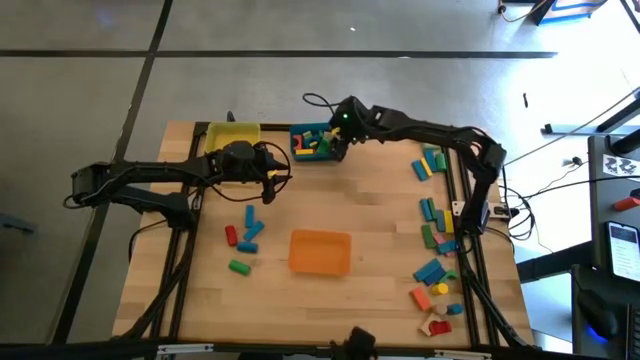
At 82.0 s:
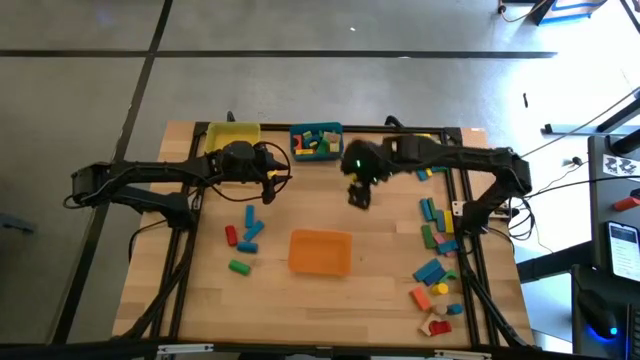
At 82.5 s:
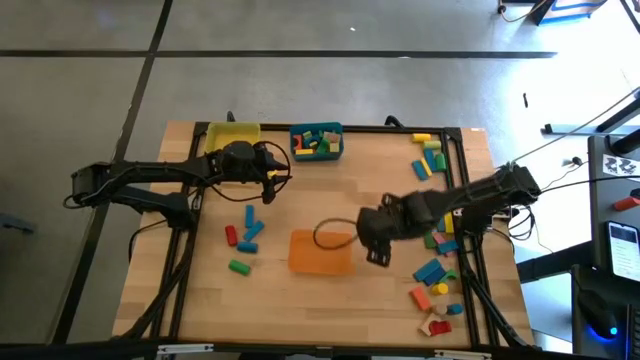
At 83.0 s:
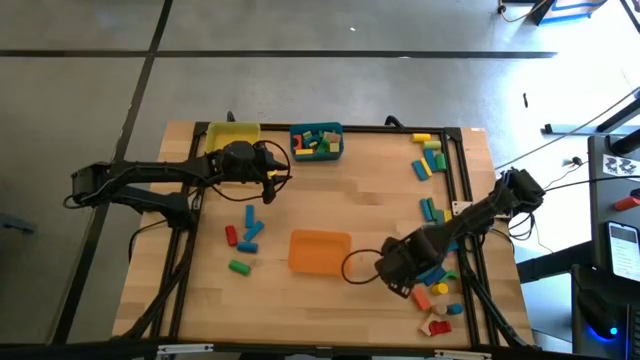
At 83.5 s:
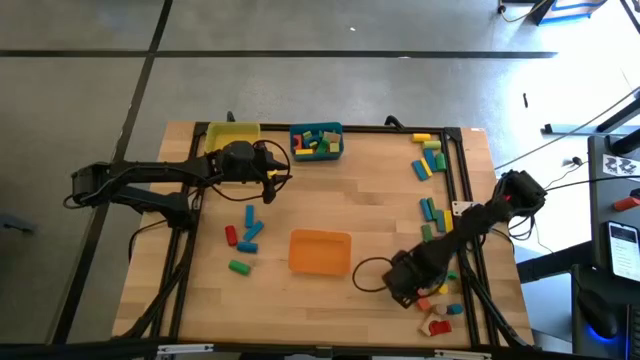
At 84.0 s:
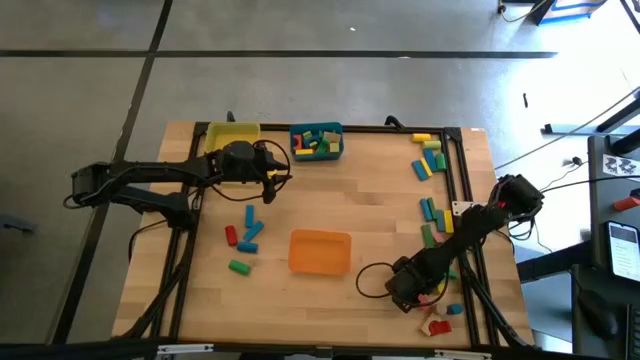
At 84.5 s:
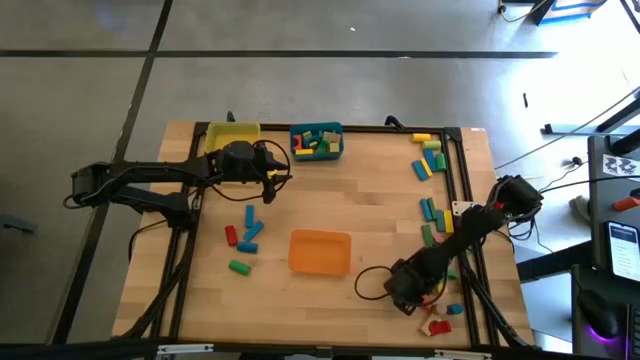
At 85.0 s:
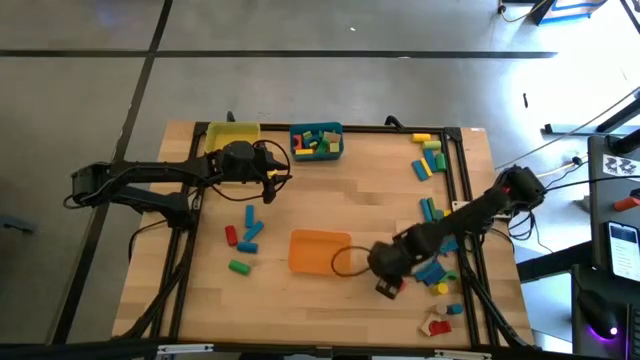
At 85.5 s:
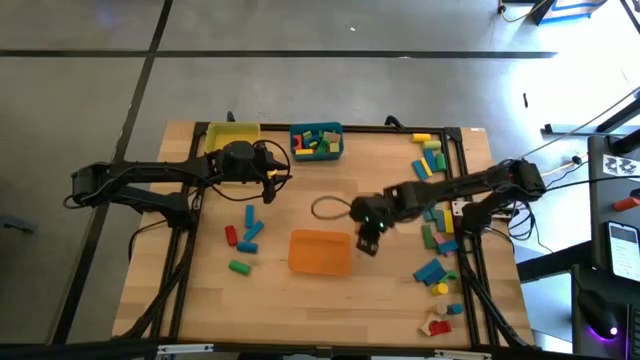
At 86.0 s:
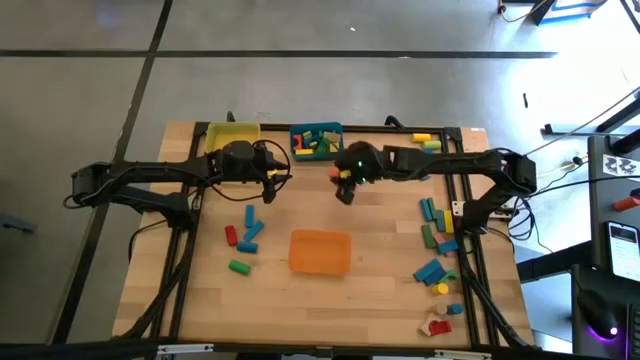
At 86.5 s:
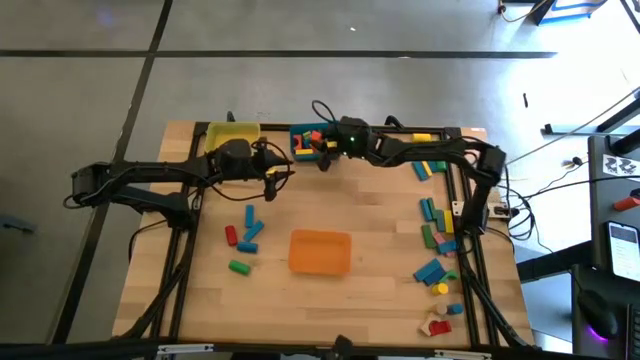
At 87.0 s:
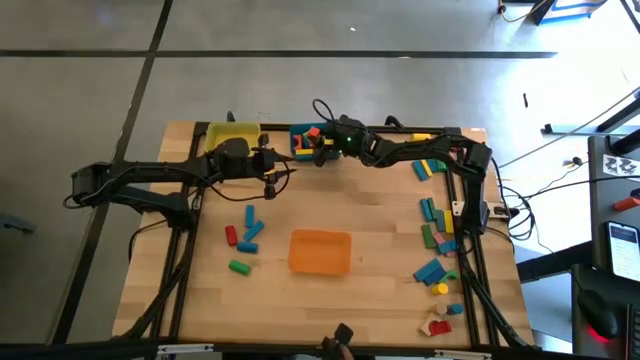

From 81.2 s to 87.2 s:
Task: Sort blocks by size
Put the orange arch block into the blue bin

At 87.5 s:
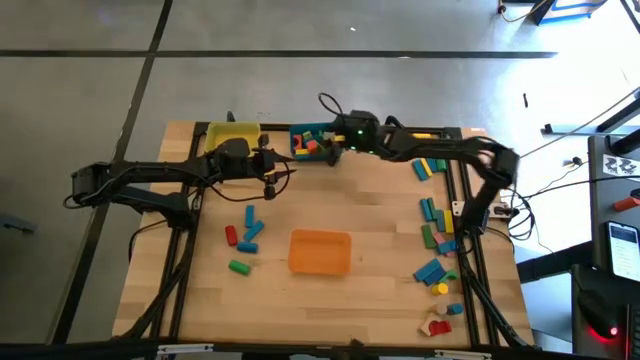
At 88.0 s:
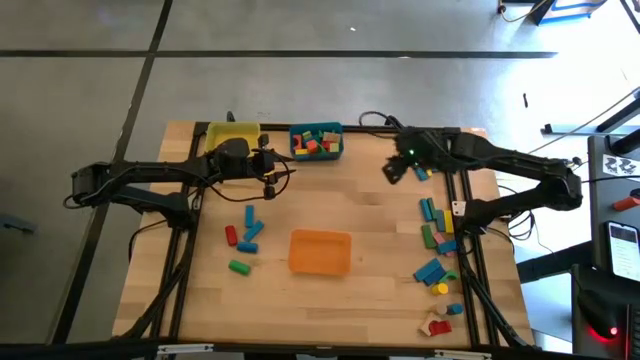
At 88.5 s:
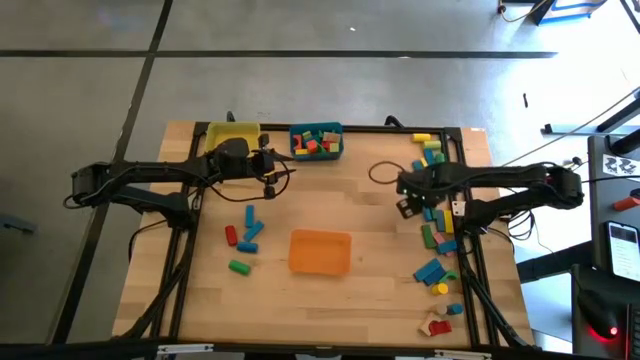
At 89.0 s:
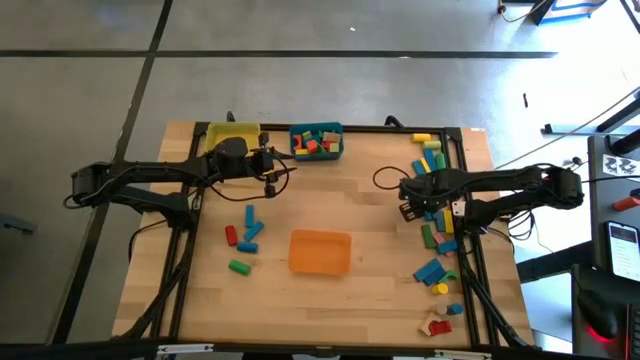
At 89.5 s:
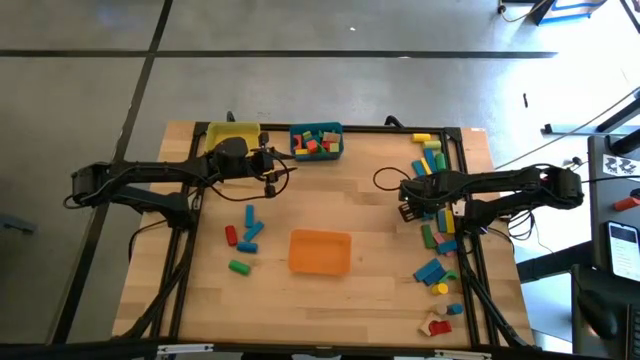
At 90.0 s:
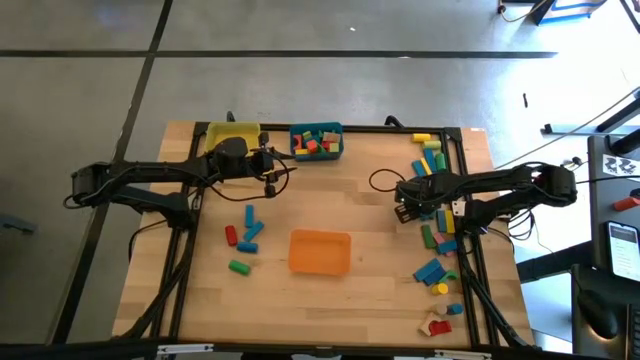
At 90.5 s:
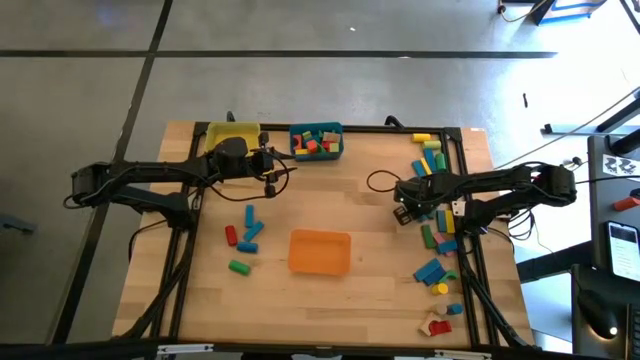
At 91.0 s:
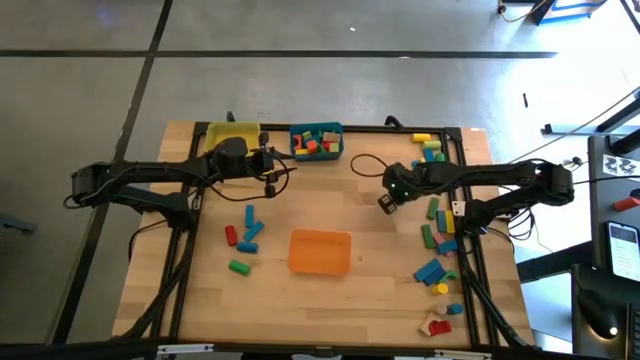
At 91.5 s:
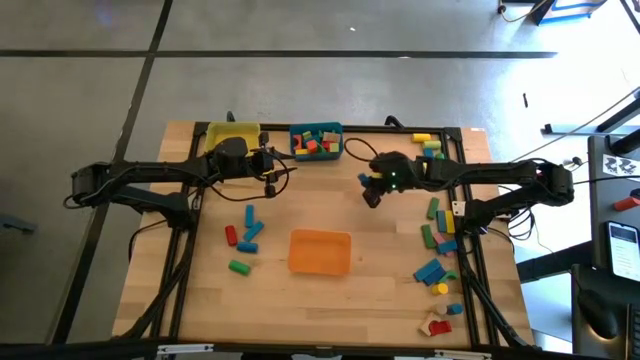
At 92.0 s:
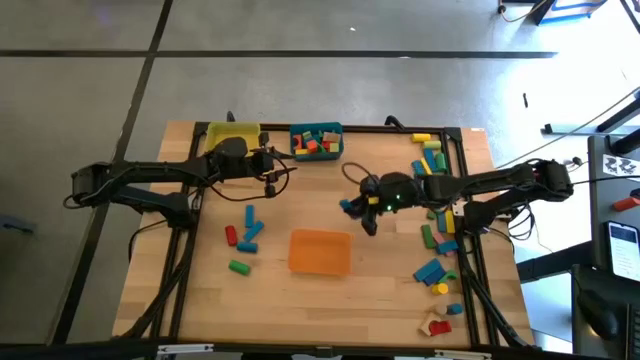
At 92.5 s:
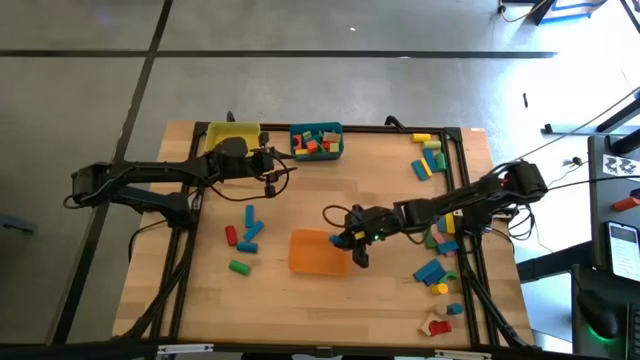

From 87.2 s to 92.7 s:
Put the blue rectangular block into the orange bin

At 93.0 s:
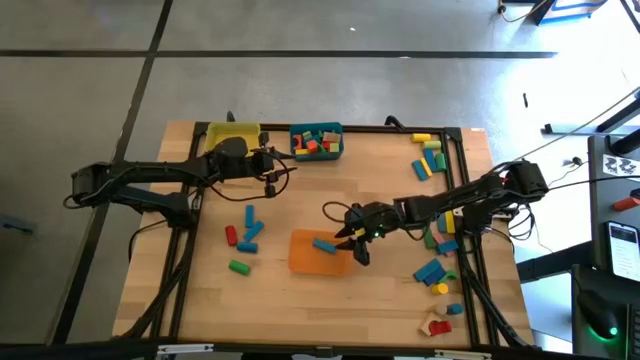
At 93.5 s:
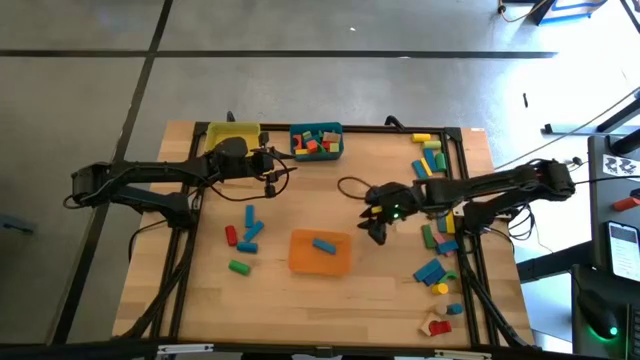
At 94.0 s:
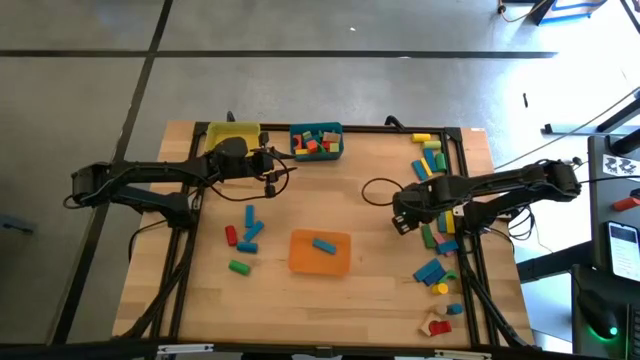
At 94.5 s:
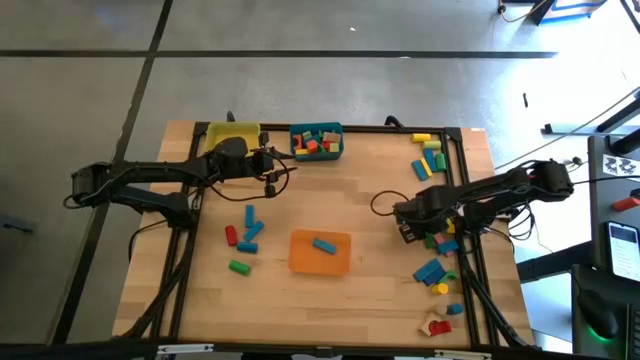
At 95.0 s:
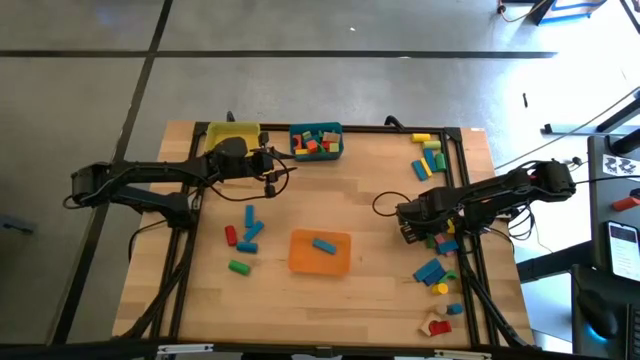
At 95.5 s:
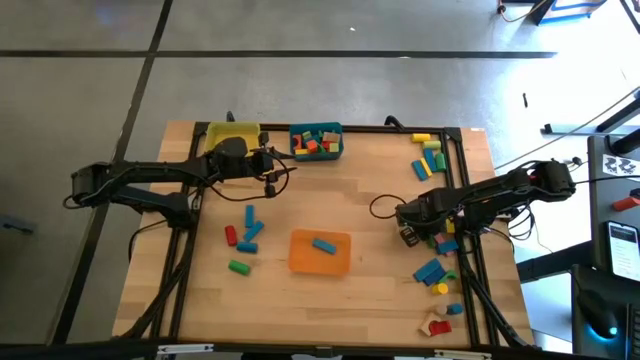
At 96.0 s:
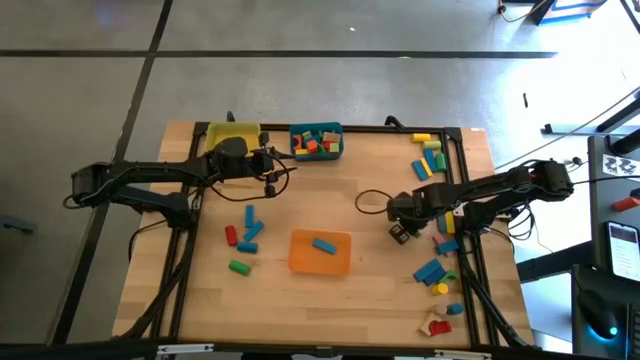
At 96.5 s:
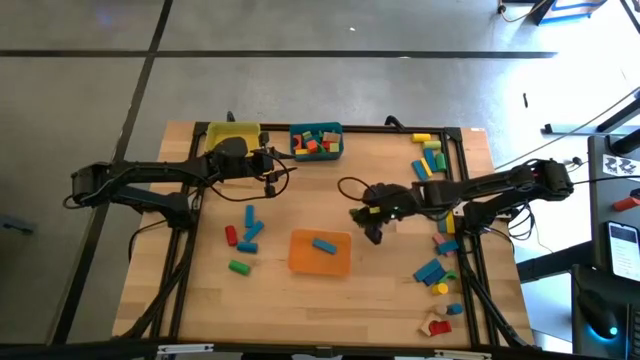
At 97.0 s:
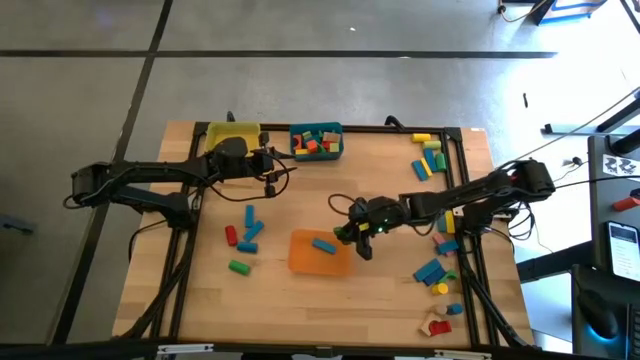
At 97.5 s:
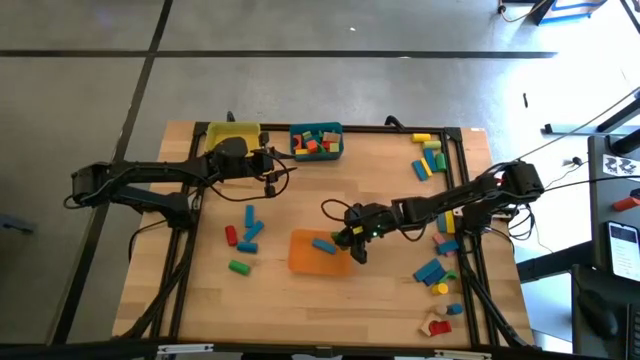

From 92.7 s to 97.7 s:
Put the green rectangular block into the orange bin

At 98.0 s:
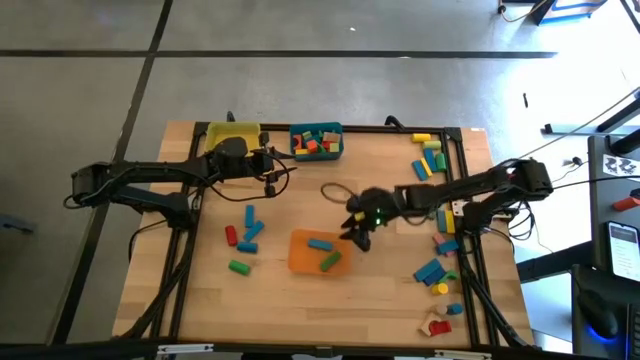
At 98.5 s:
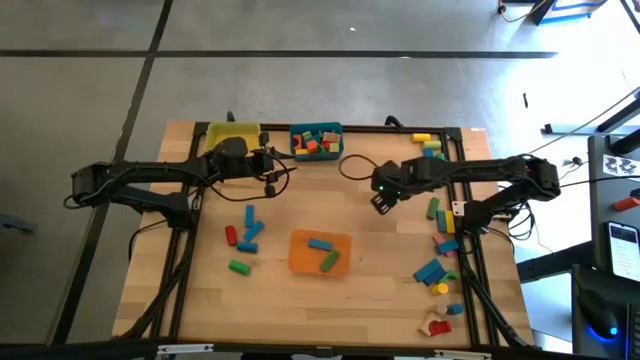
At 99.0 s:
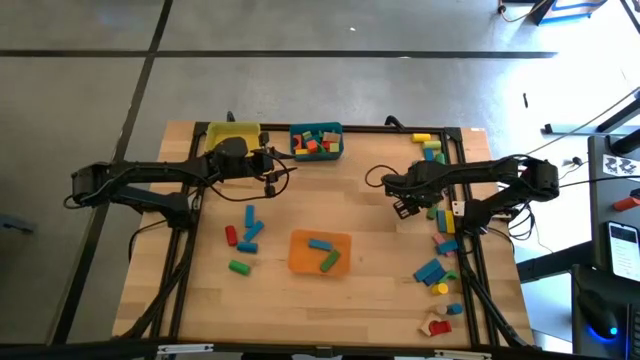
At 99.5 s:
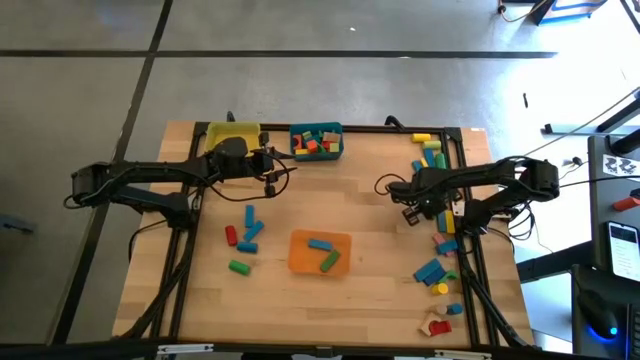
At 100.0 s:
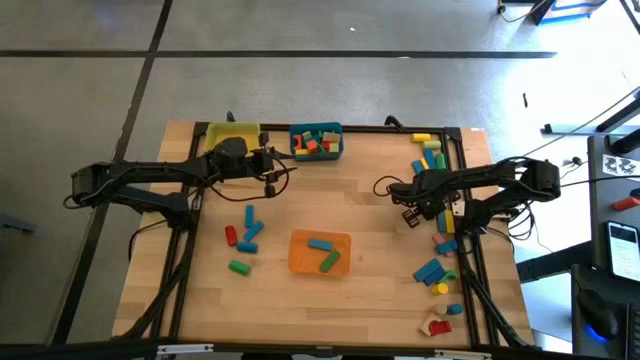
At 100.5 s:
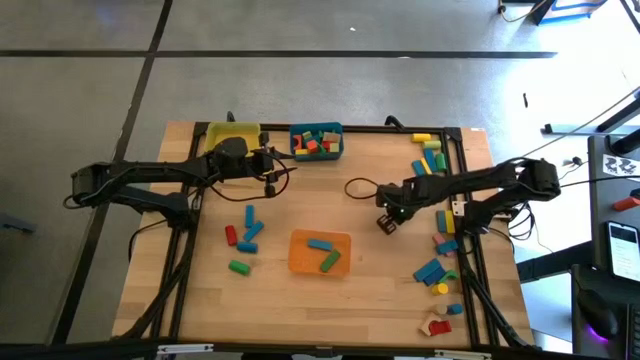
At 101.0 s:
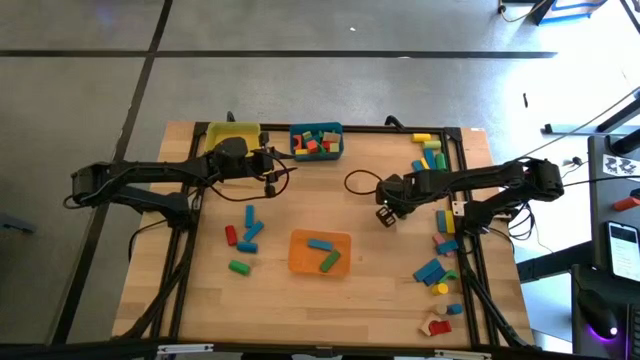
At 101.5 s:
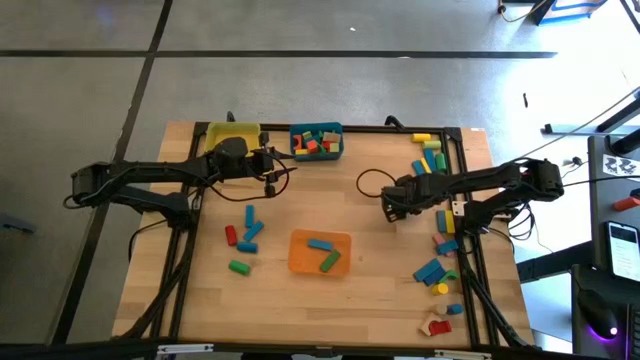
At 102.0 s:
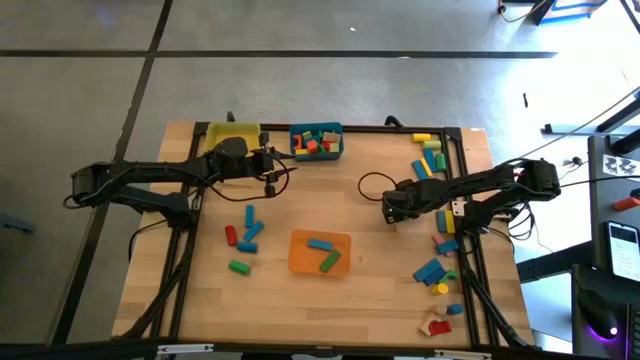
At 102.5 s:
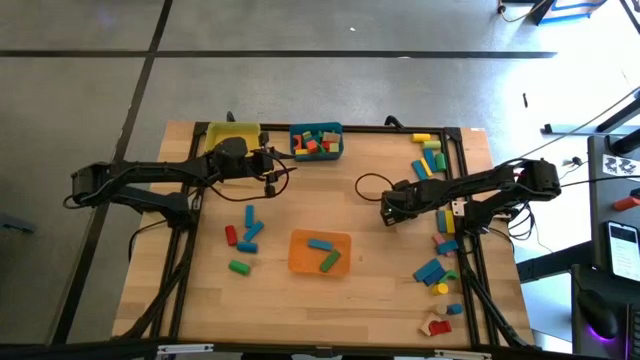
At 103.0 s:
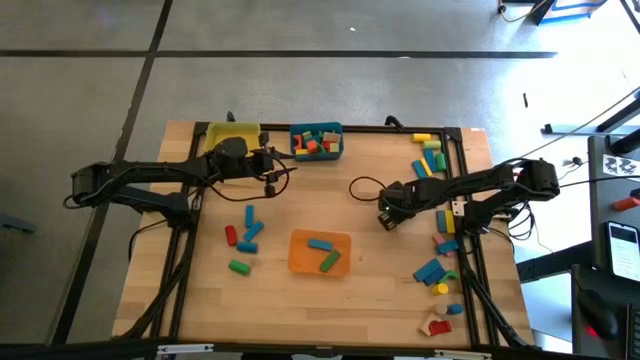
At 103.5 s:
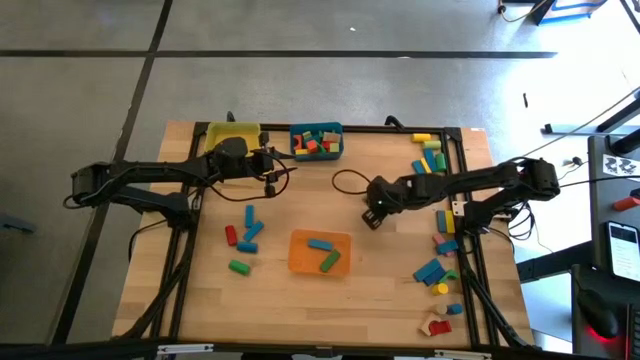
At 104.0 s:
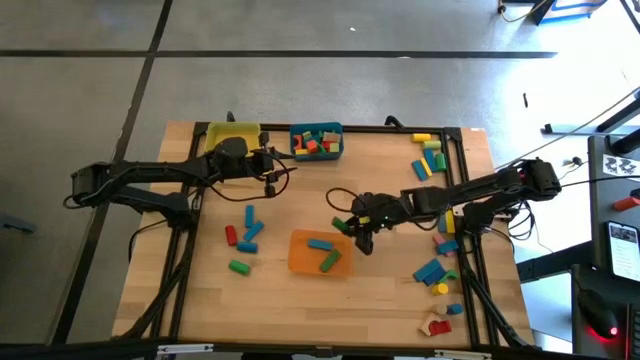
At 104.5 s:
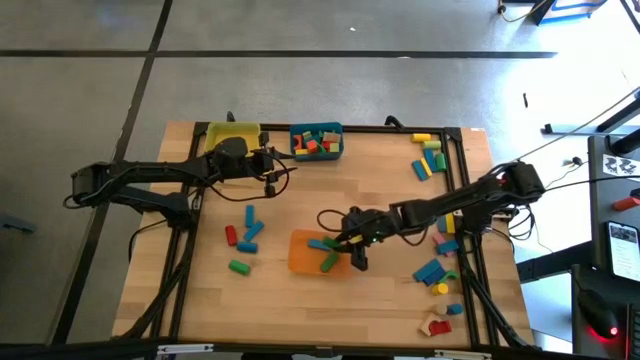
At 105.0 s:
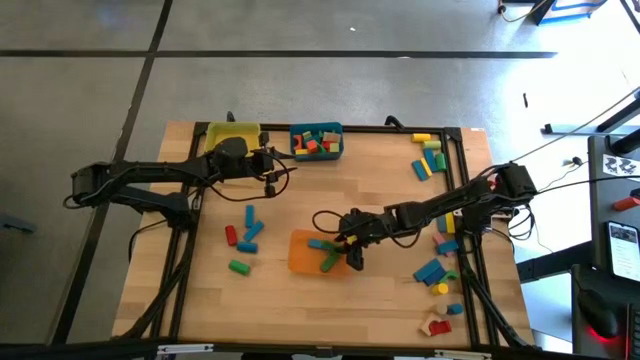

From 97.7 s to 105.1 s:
Put the green rectangular block into the orange bin
